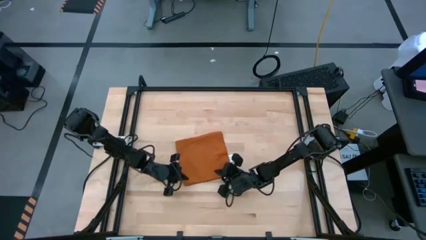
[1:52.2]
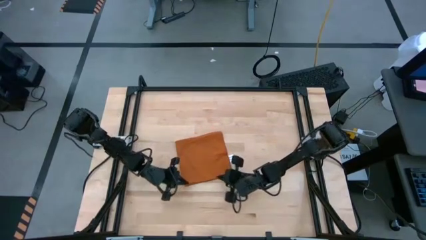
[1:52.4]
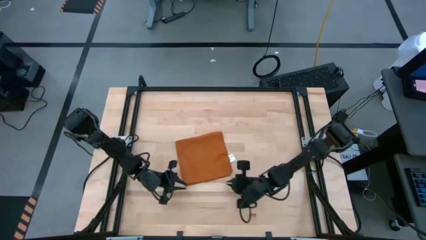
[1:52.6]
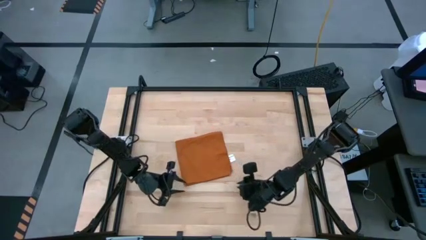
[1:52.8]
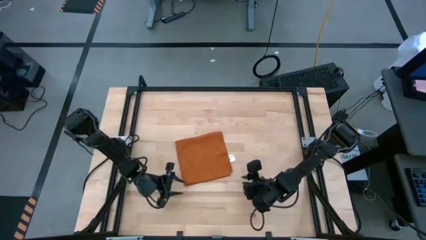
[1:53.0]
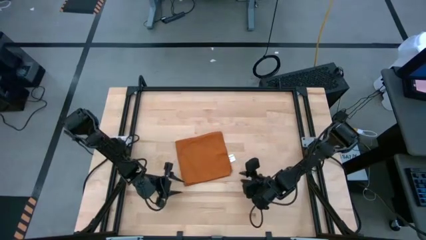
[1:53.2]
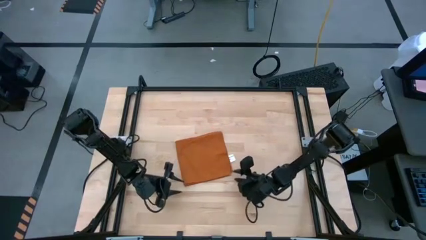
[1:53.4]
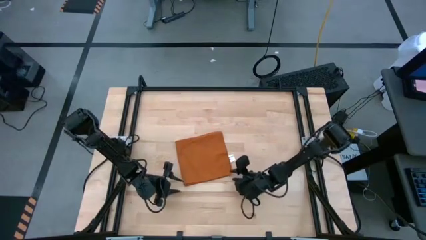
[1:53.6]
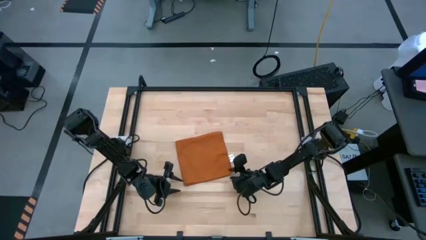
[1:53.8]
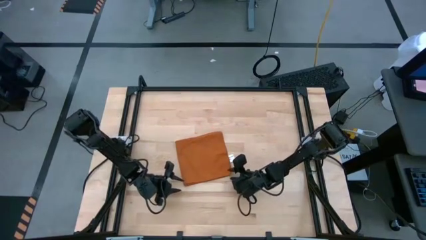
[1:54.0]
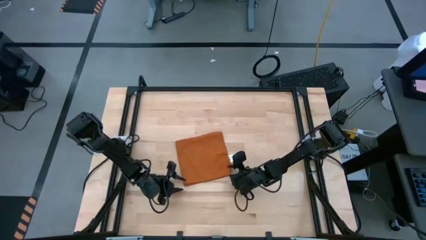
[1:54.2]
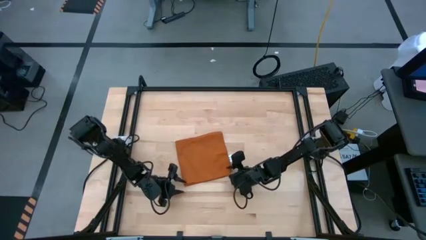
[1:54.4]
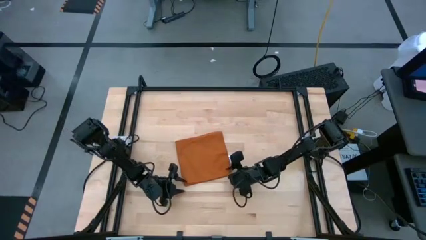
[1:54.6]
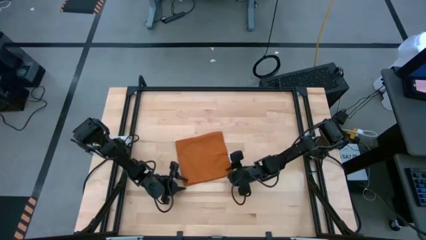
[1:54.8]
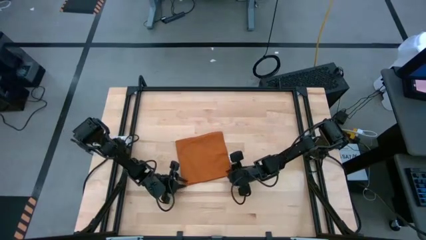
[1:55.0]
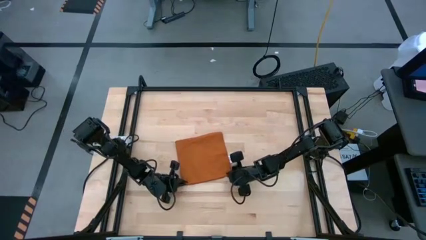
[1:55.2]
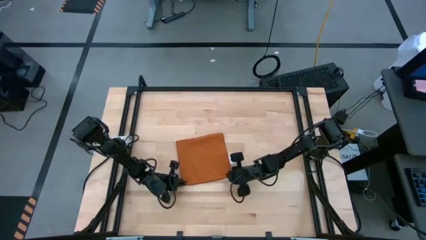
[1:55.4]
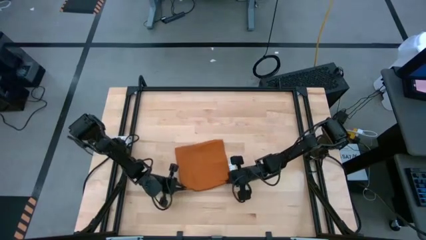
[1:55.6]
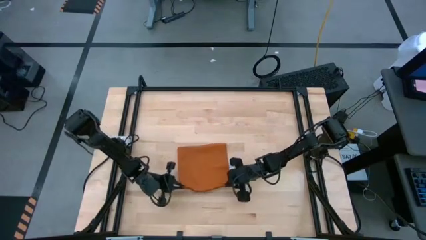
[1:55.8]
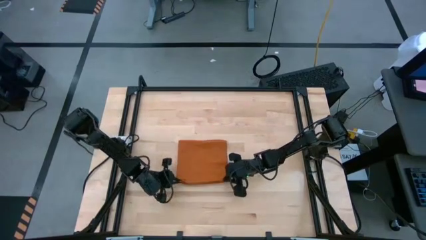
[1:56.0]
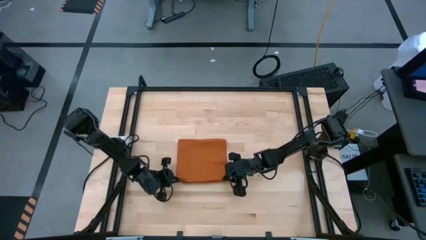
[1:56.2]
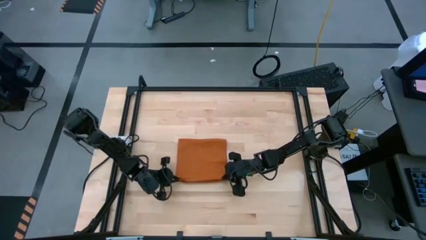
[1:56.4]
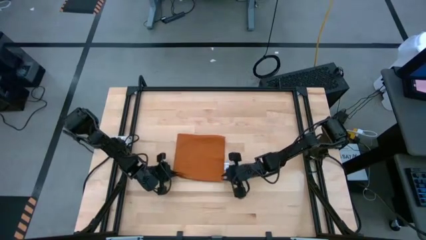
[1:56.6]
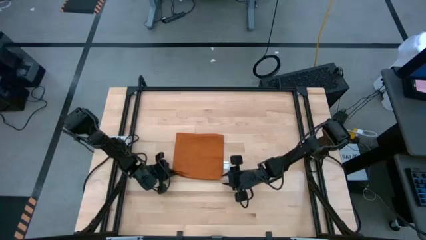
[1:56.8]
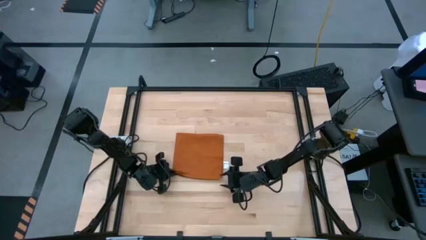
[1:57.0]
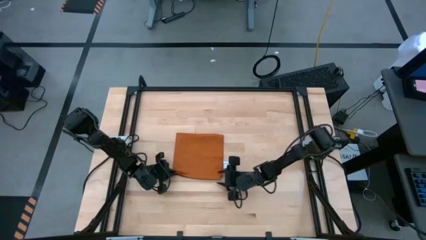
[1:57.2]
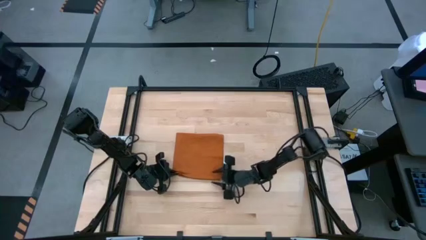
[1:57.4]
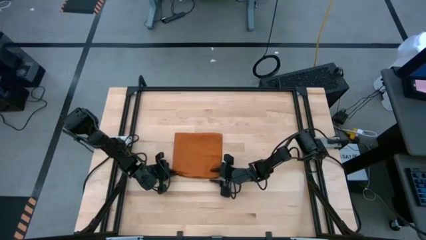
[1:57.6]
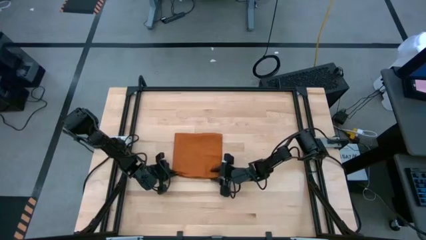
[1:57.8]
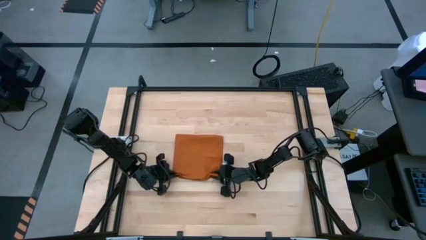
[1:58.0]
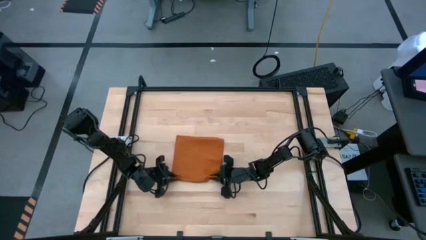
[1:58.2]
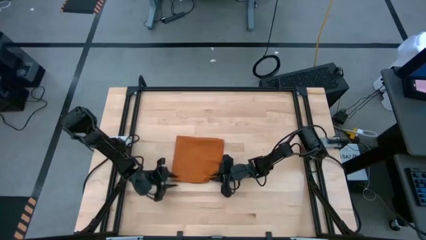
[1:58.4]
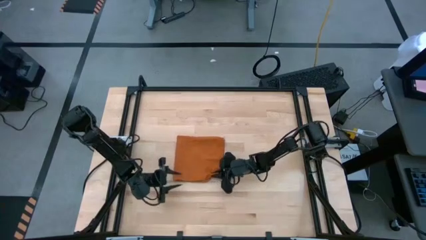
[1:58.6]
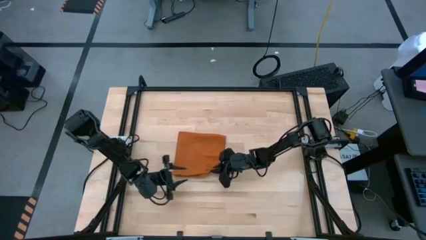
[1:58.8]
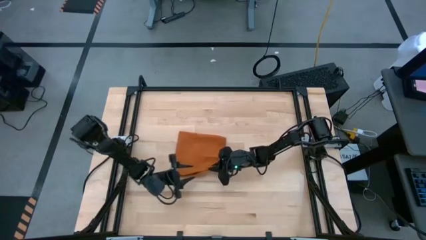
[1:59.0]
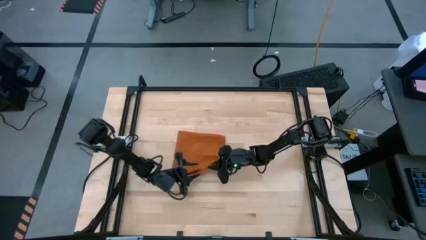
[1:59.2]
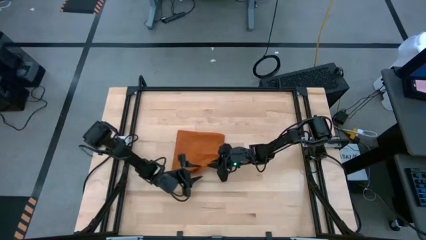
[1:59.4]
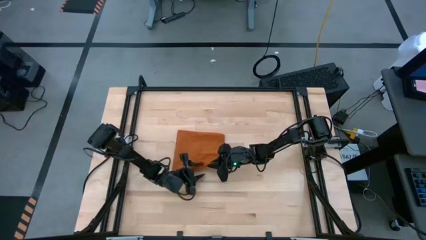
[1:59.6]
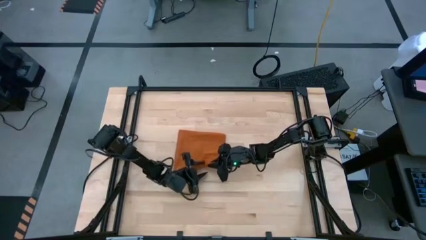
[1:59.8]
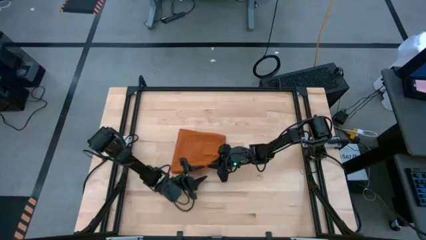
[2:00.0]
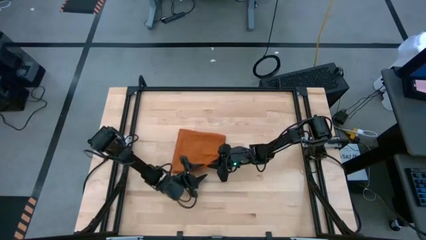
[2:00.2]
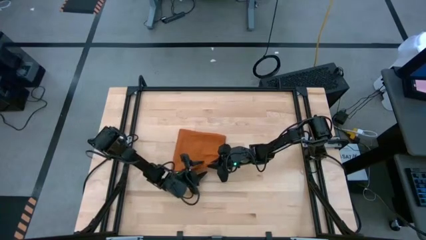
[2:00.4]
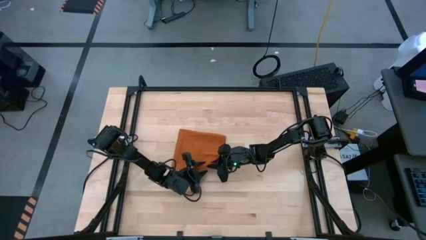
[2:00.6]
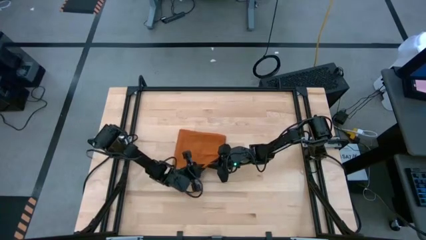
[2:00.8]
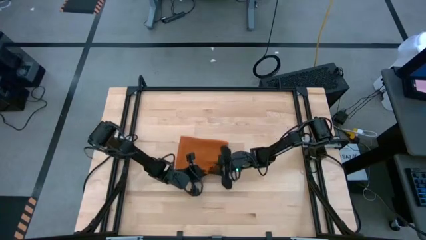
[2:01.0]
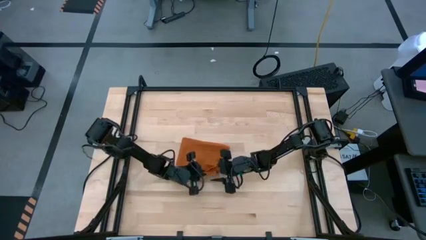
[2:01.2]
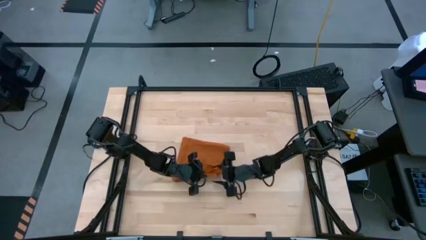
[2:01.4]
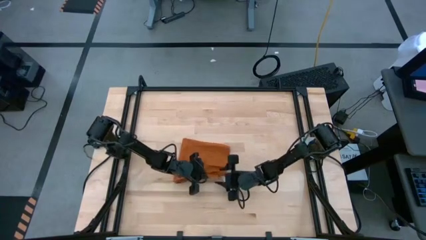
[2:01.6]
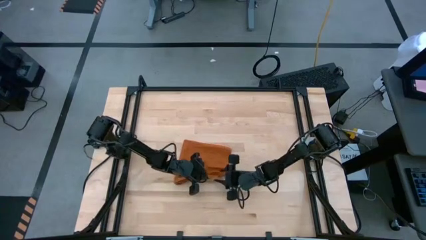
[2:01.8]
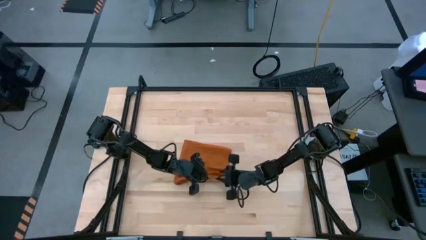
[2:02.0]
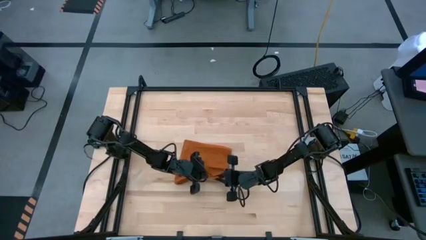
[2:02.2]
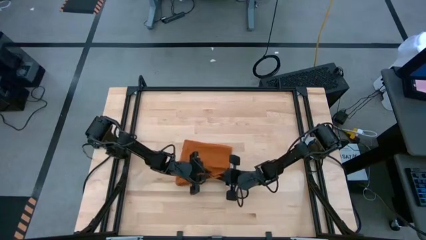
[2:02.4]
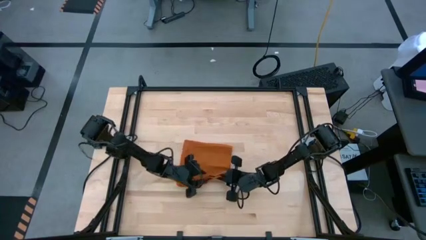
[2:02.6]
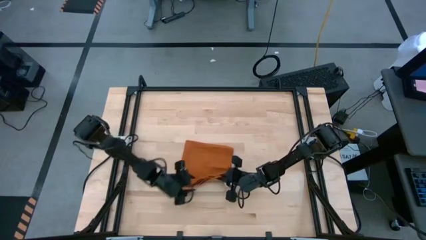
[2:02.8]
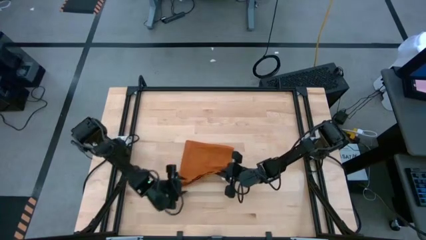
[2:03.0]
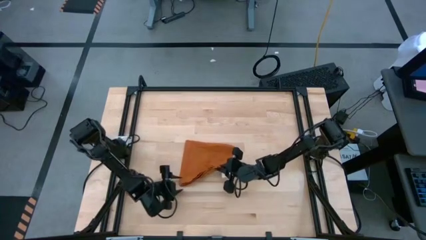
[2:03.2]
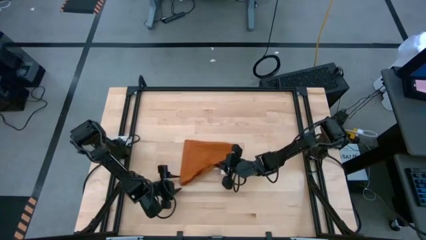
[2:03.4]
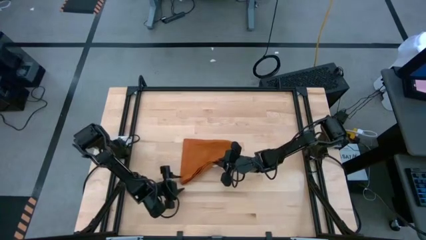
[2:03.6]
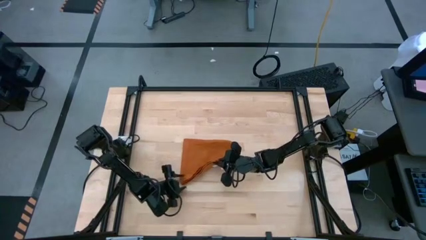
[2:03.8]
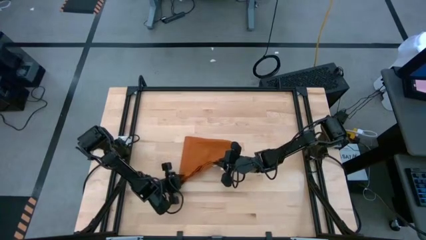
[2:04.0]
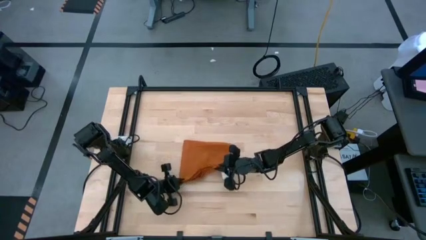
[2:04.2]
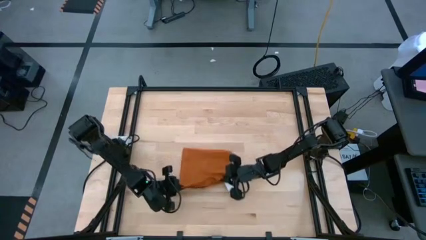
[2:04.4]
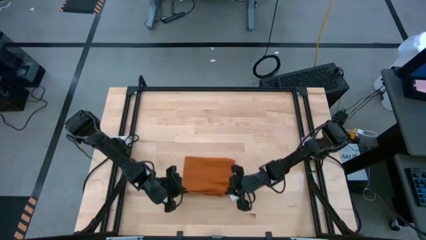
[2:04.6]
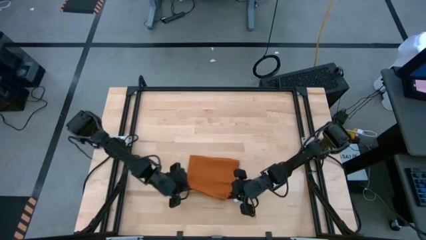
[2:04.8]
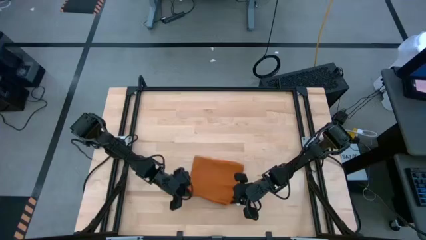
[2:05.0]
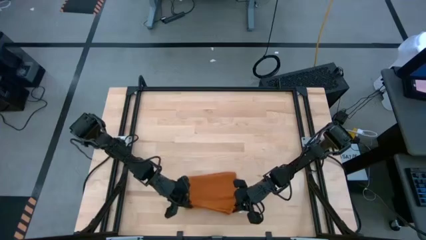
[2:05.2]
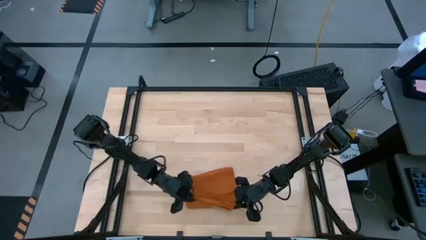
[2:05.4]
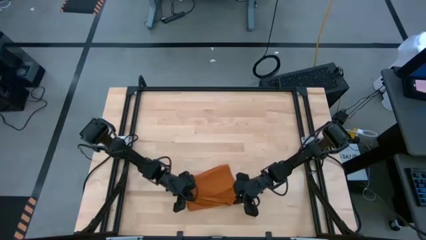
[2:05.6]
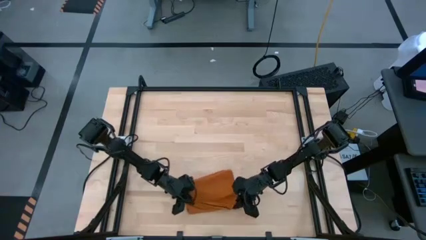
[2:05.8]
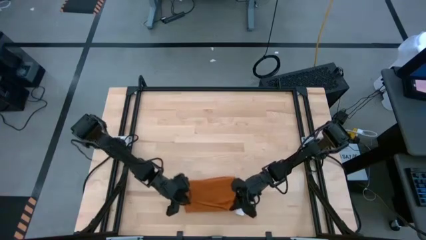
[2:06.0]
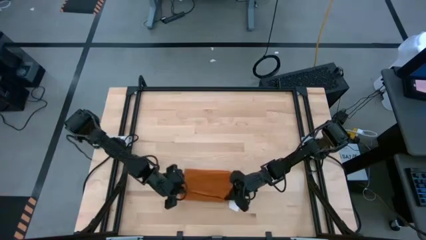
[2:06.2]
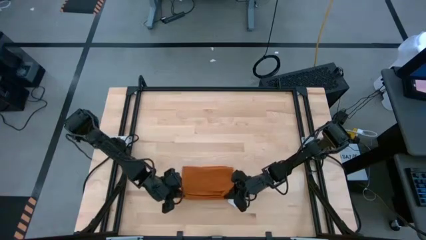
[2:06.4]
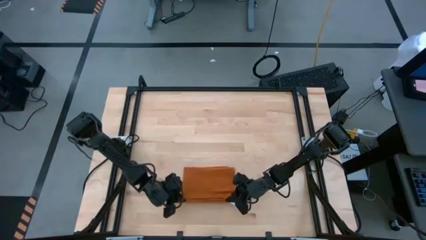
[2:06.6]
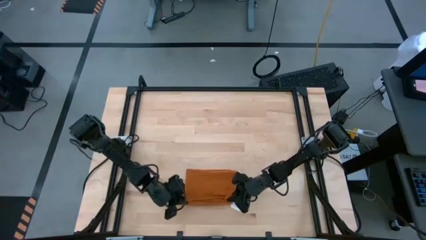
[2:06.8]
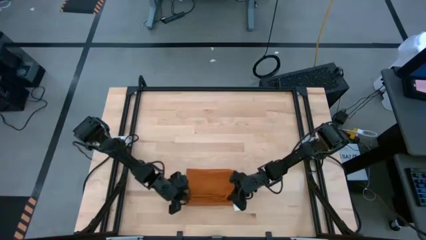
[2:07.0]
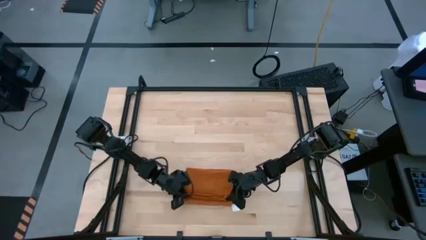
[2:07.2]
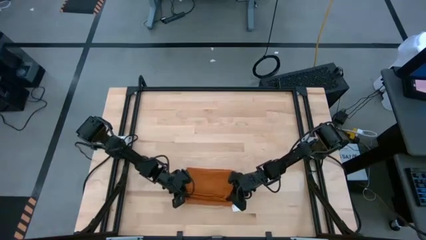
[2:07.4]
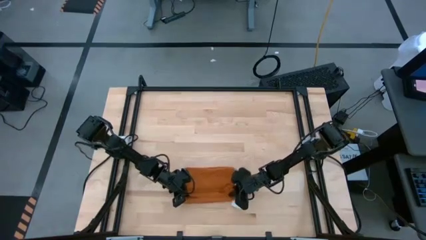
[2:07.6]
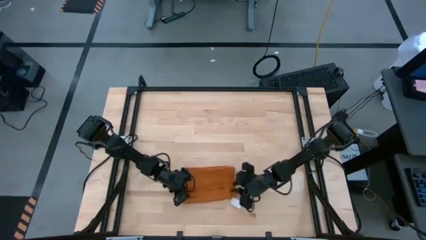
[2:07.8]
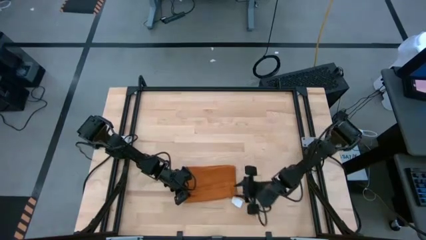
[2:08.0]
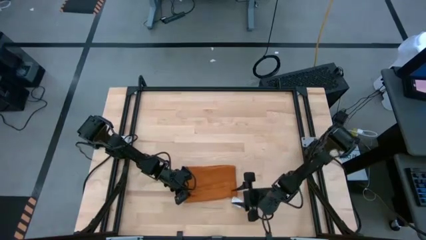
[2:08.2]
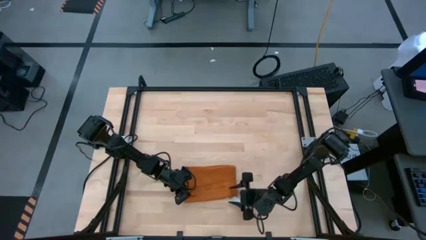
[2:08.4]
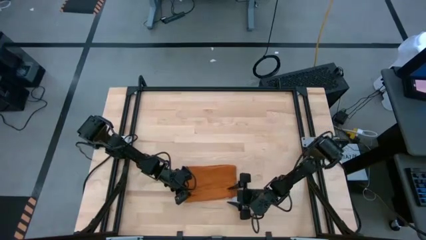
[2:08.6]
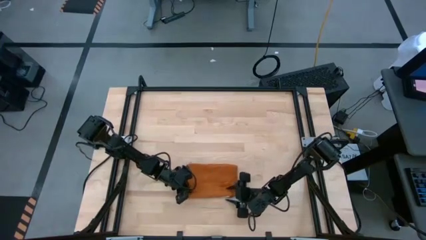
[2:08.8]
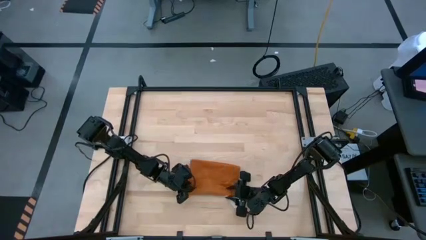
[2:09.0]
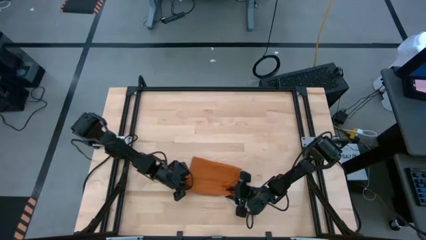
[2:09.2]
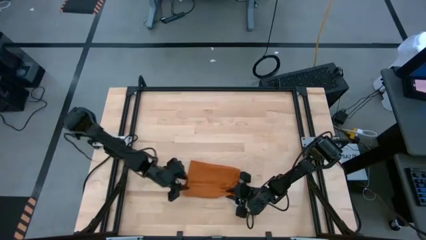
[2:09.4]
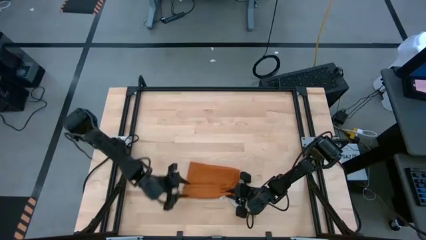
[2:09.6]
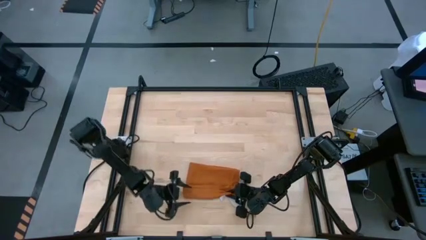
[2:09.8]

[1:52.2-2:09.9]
Task: Roll towel
Roll the brown towel
